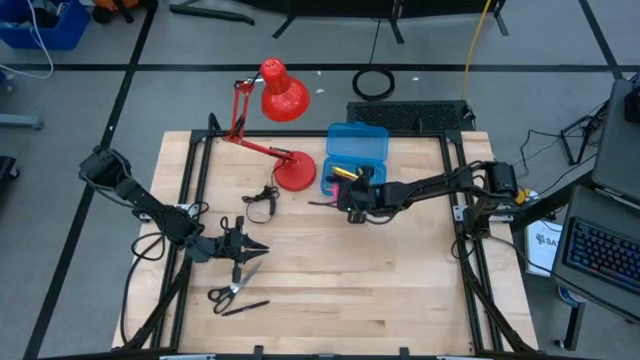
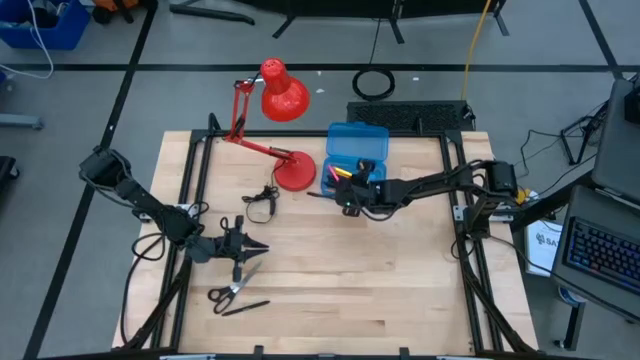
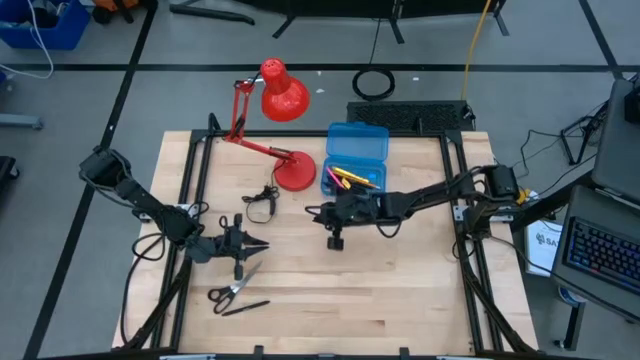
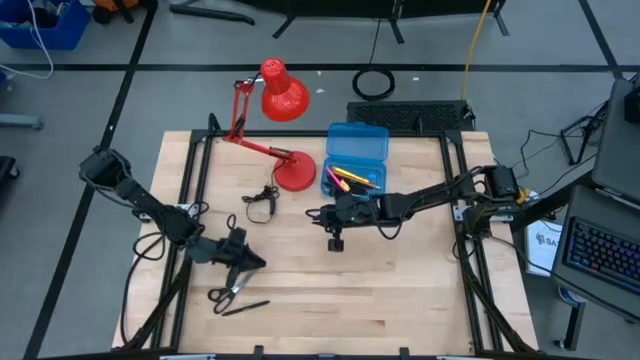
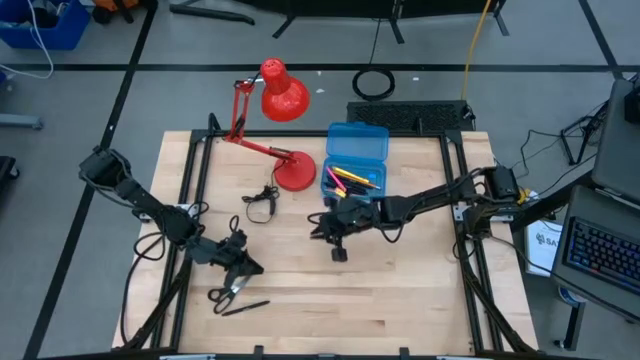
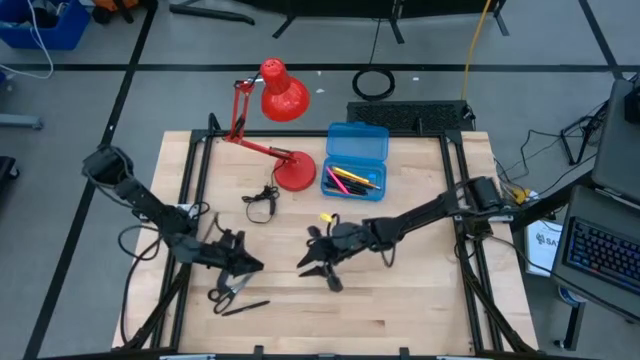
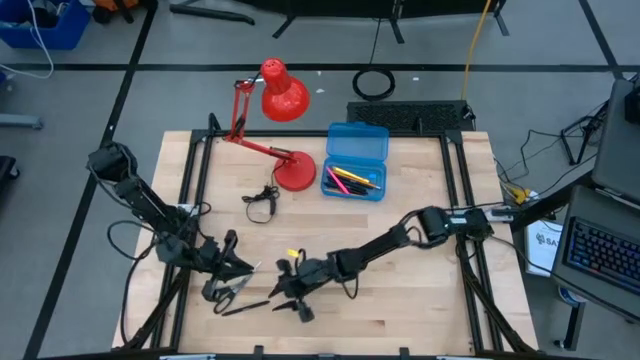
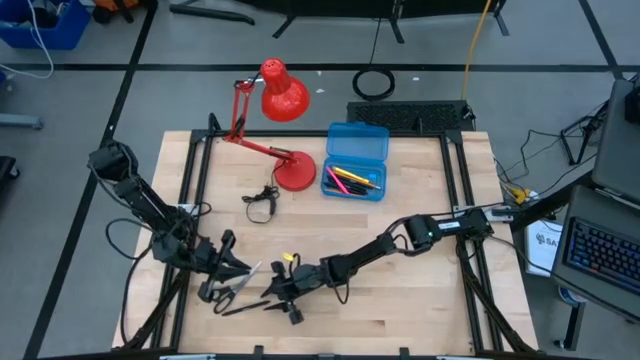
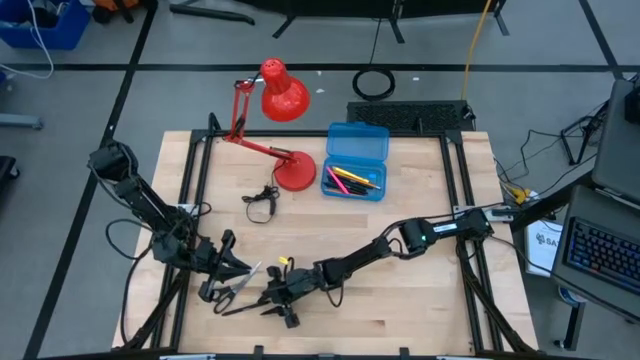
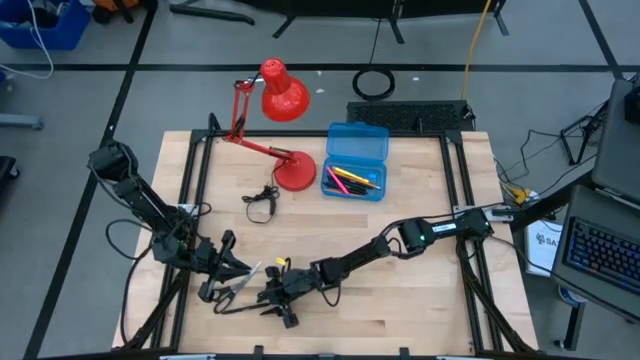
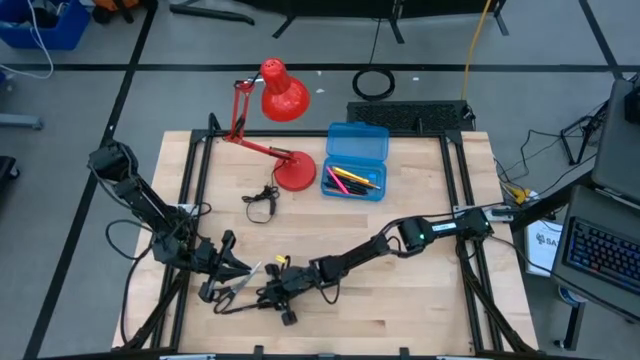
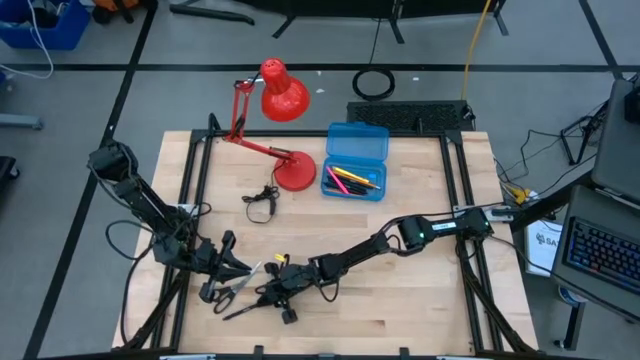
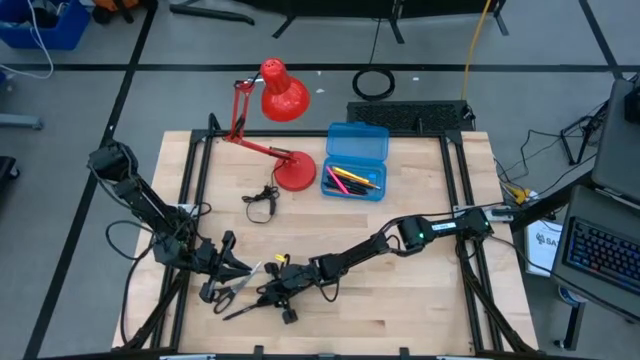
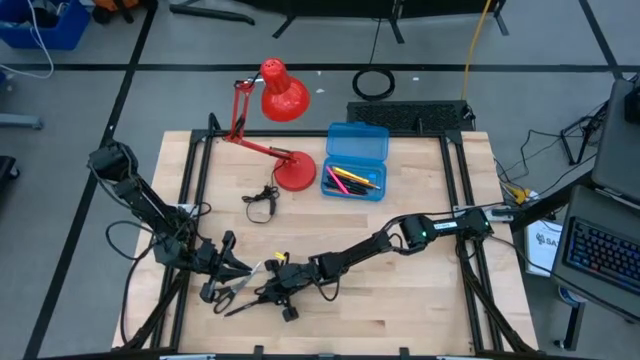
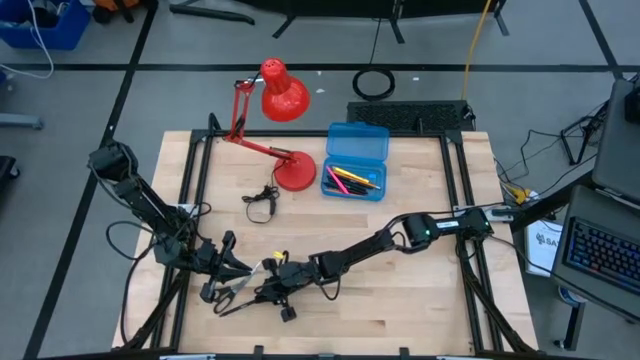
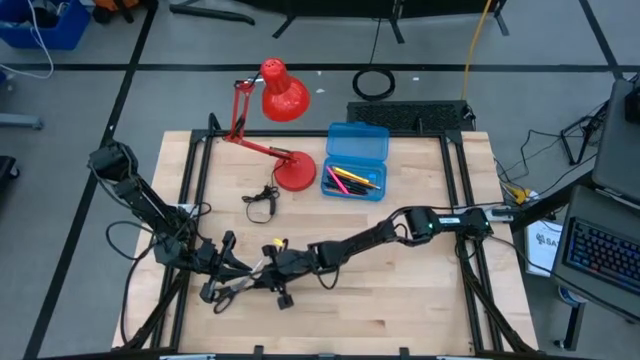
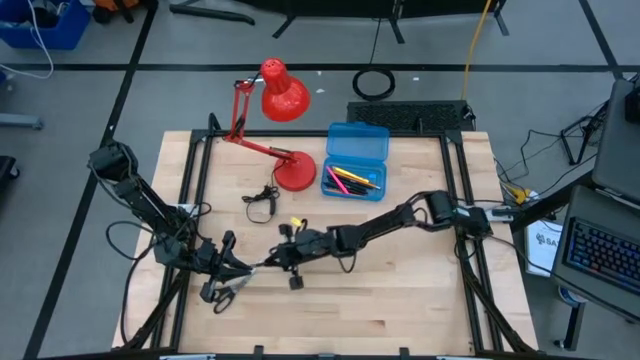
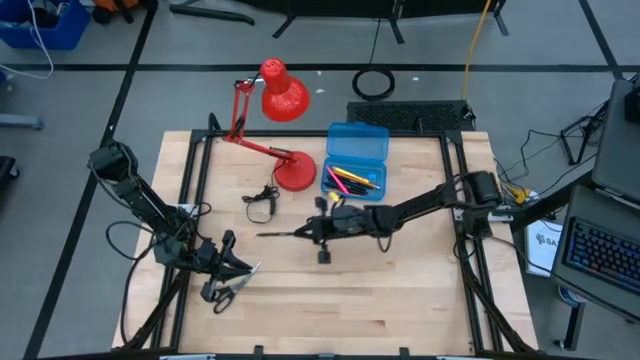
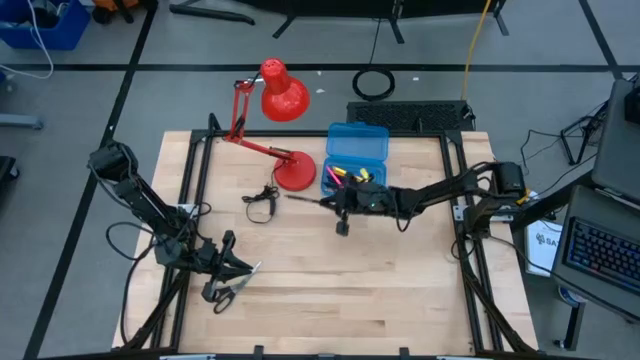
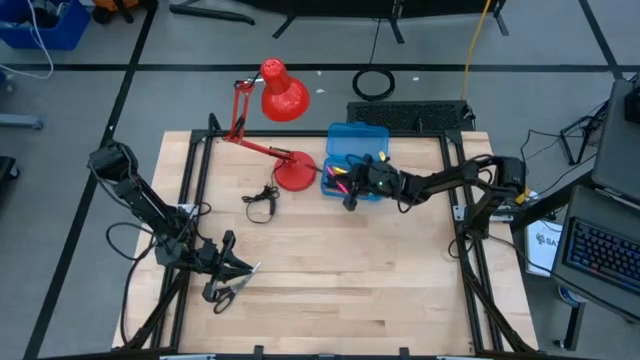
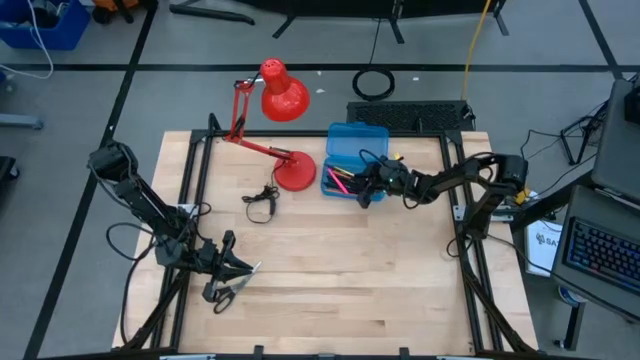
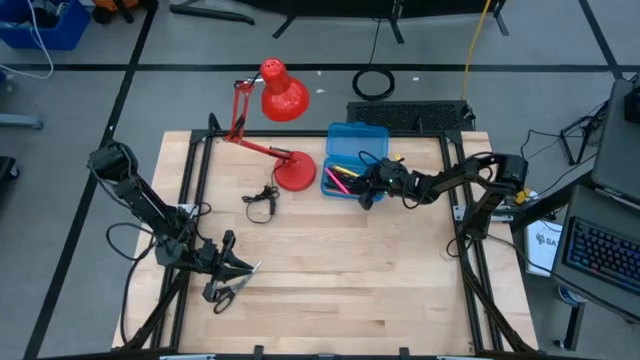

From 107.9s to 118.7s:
Task: Pick & place school supplies into a supply box
Put the black pen into the blue supply box

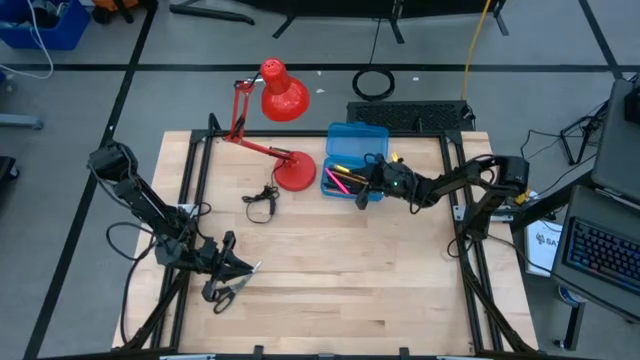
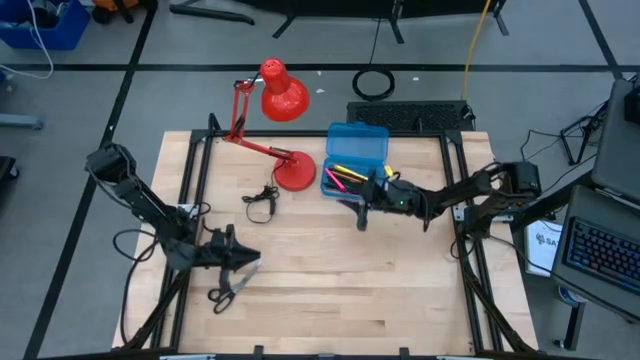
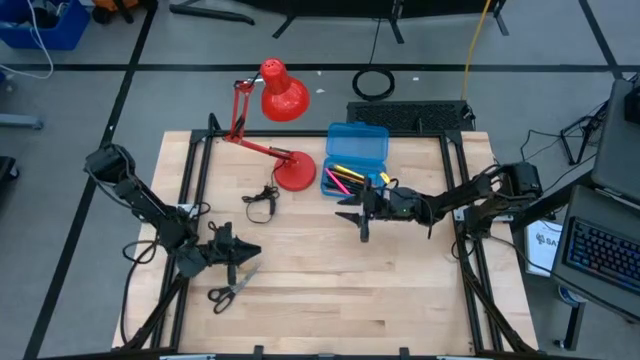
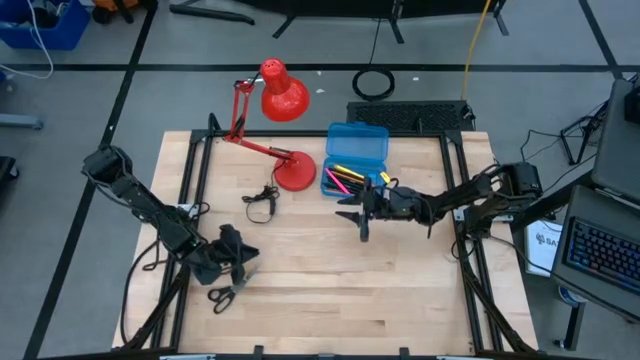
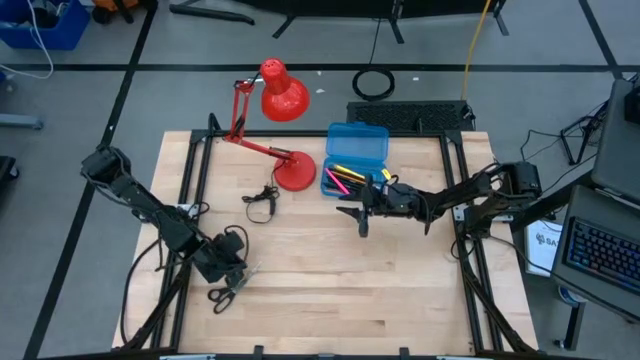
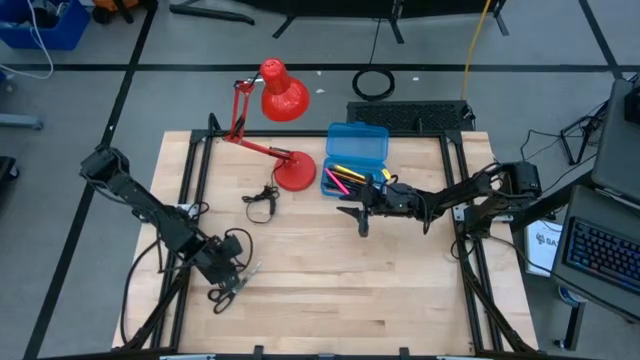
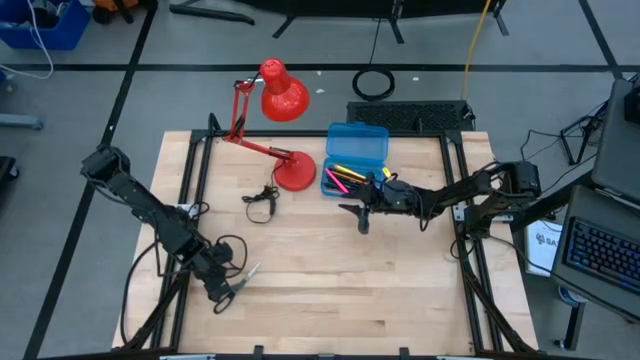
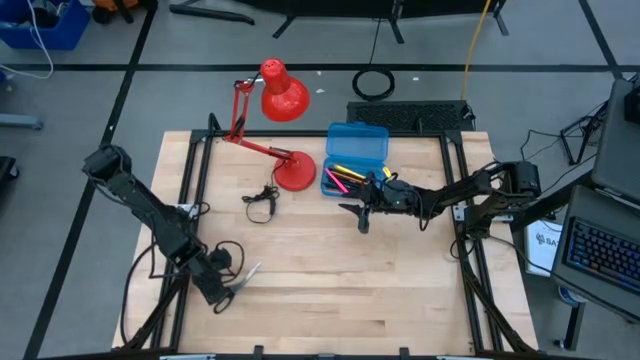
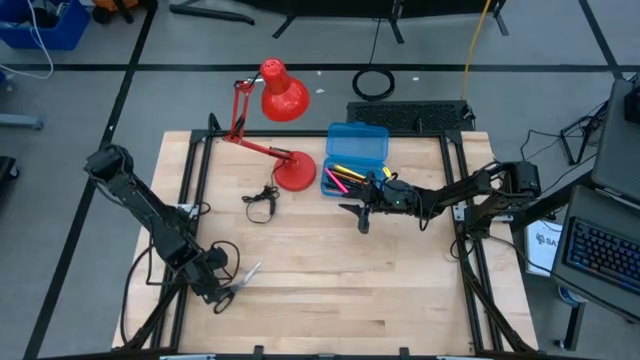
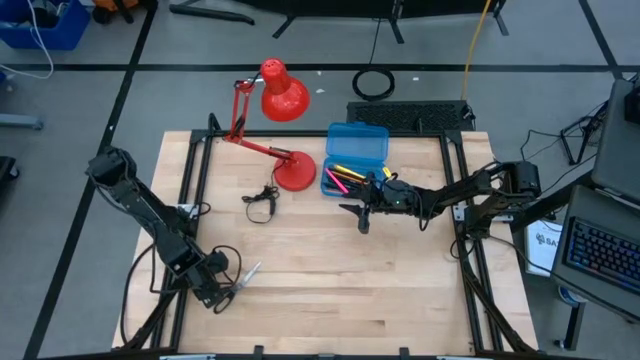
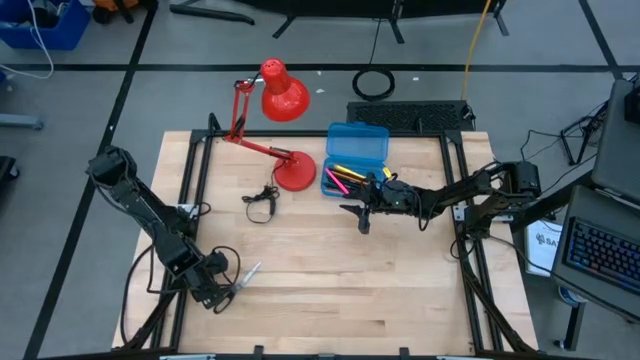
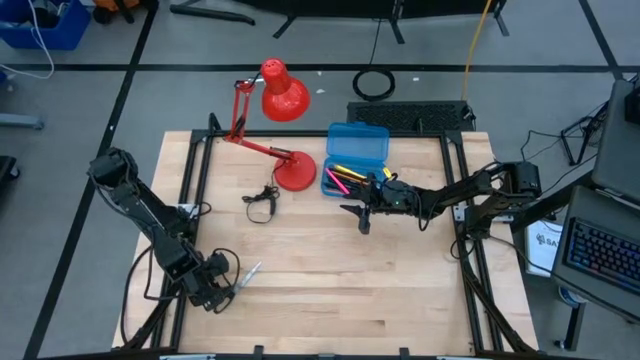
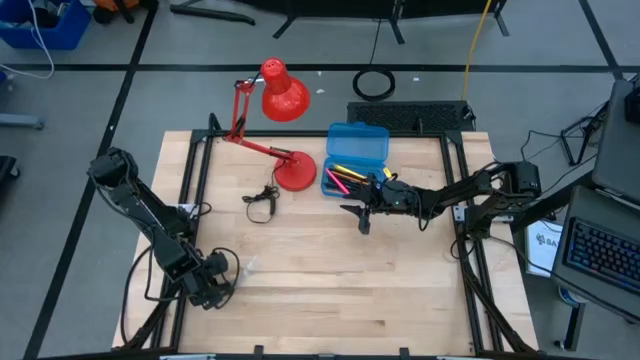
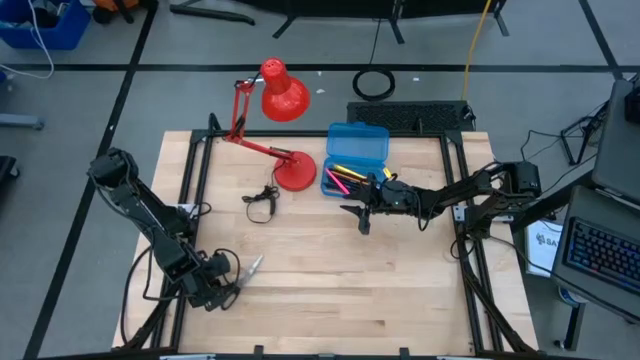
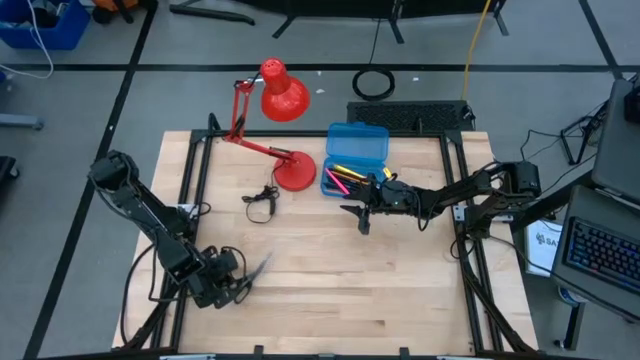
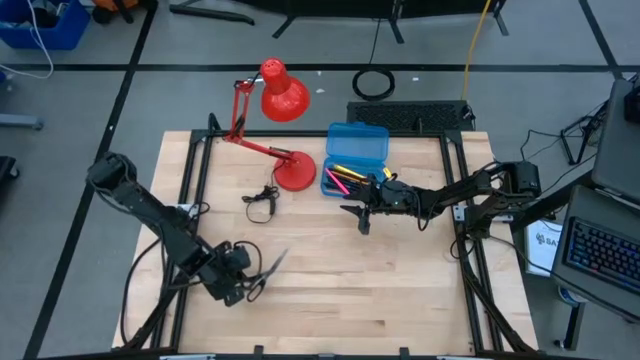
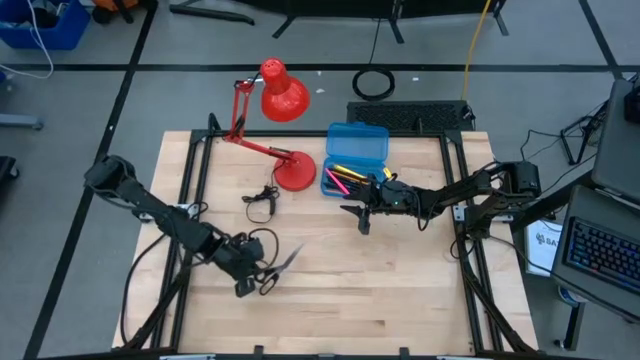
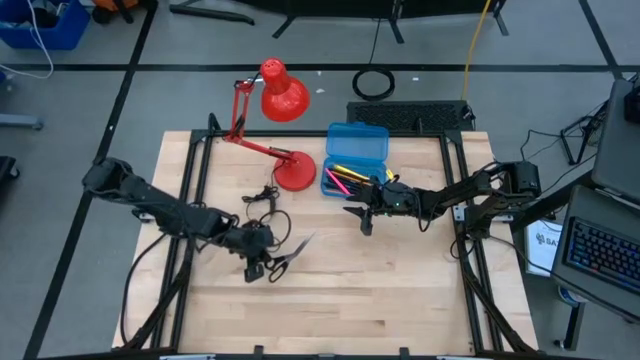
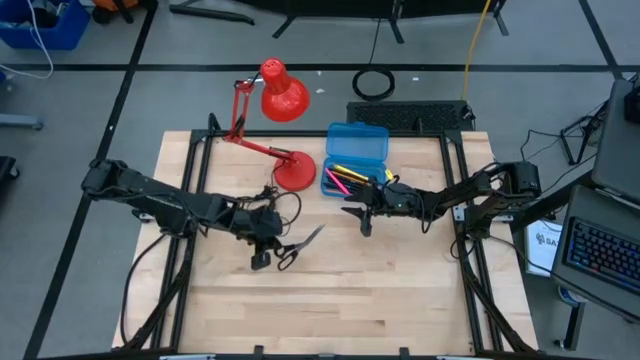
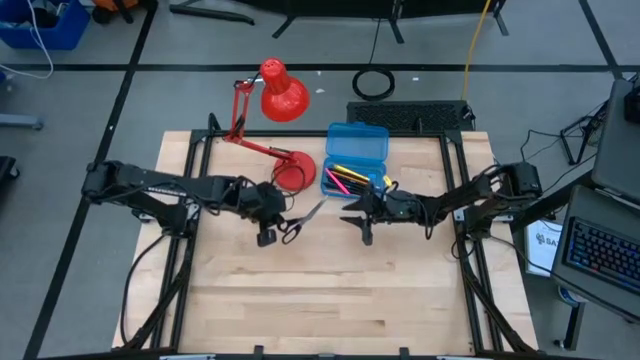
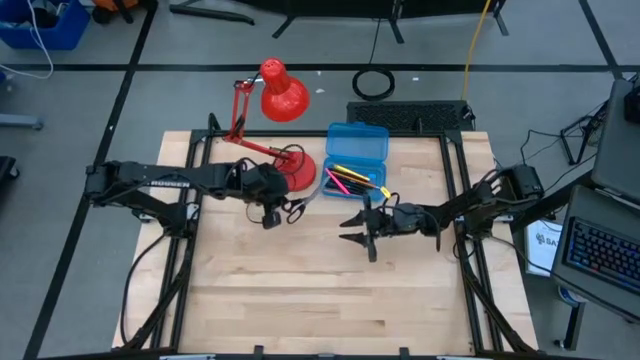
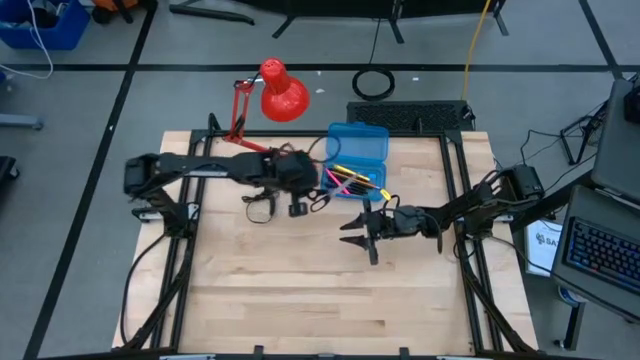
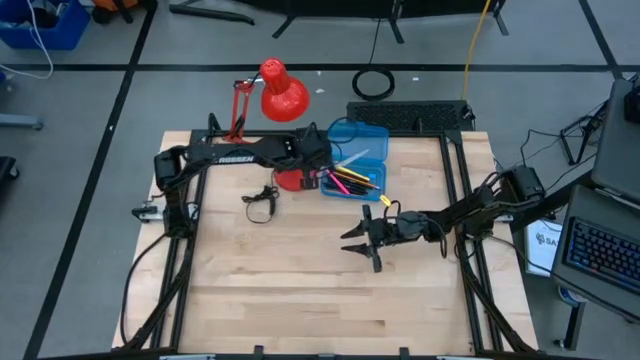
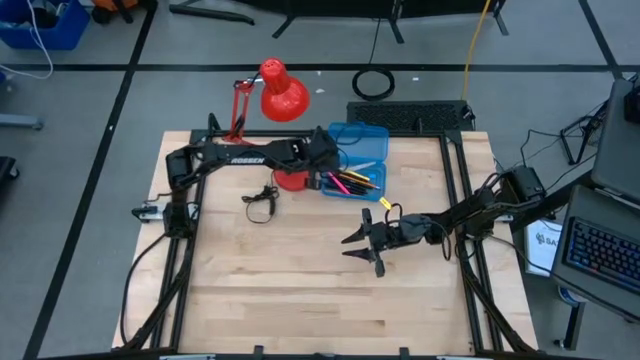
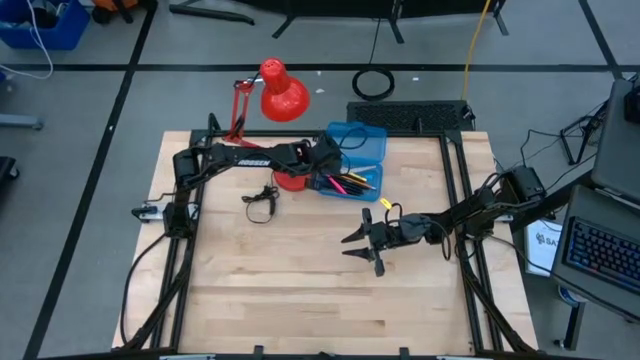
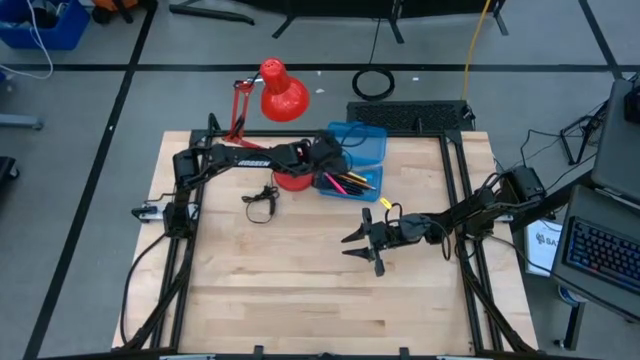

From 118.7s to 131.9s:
Put the black pen into the blue supply box
